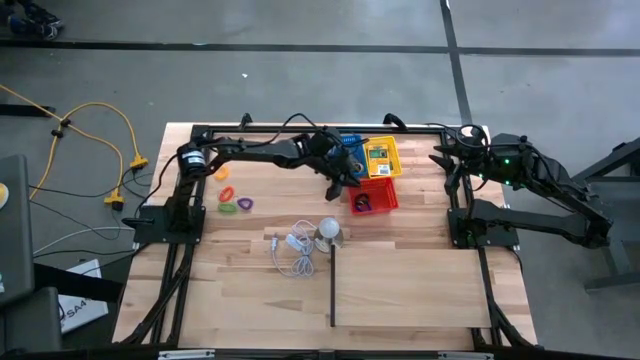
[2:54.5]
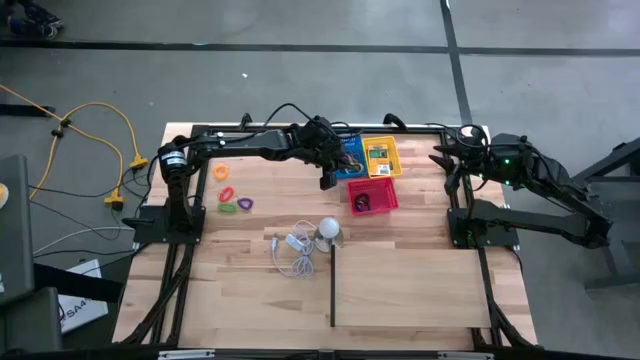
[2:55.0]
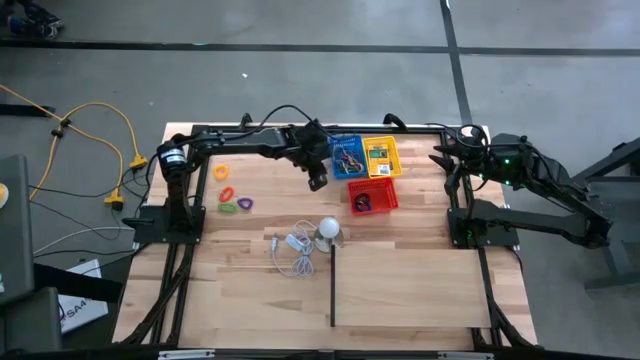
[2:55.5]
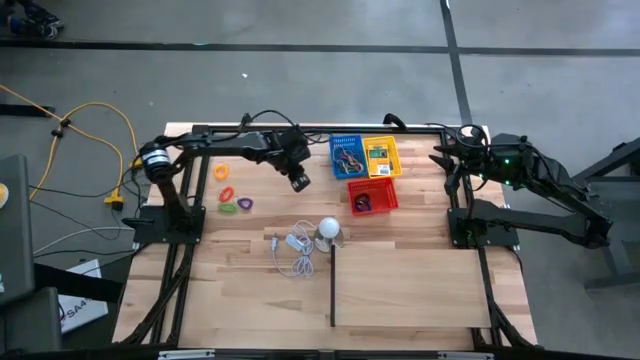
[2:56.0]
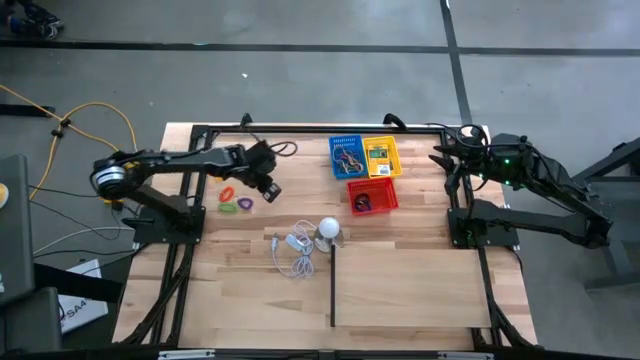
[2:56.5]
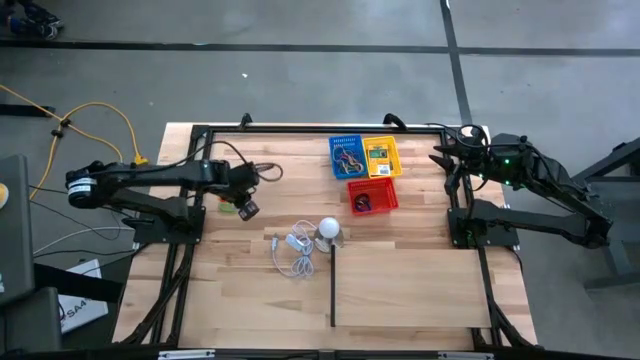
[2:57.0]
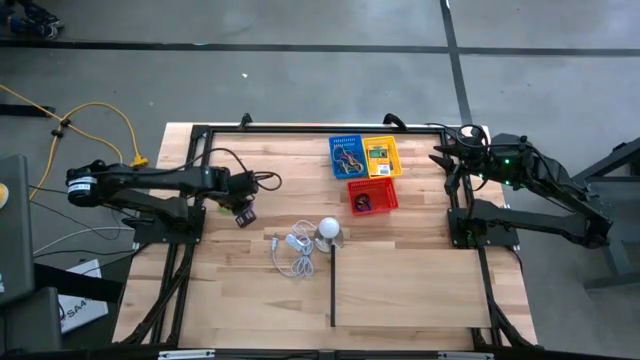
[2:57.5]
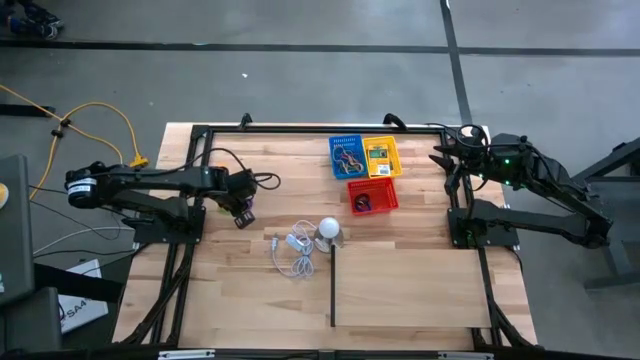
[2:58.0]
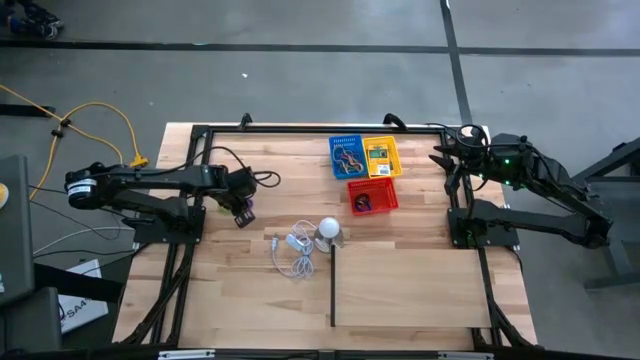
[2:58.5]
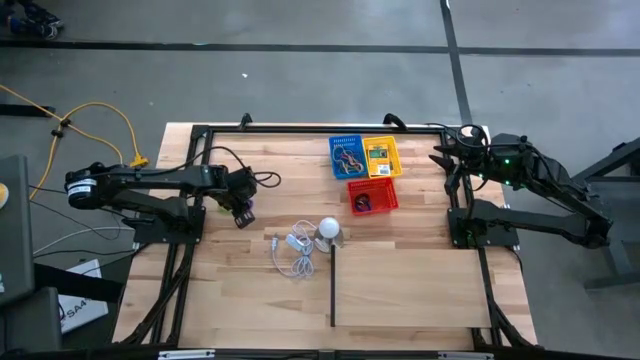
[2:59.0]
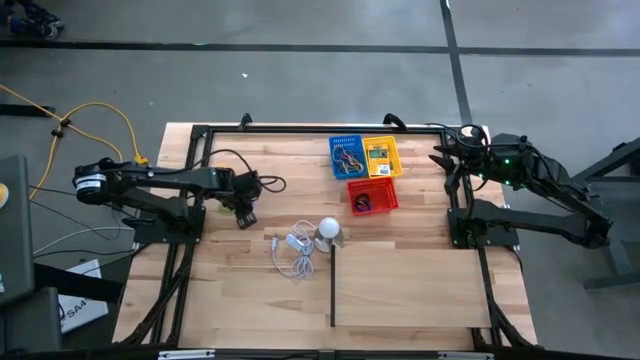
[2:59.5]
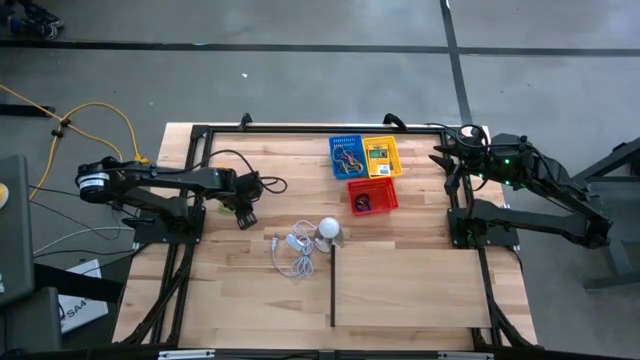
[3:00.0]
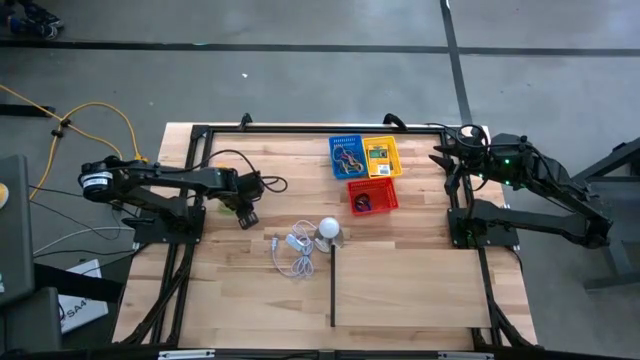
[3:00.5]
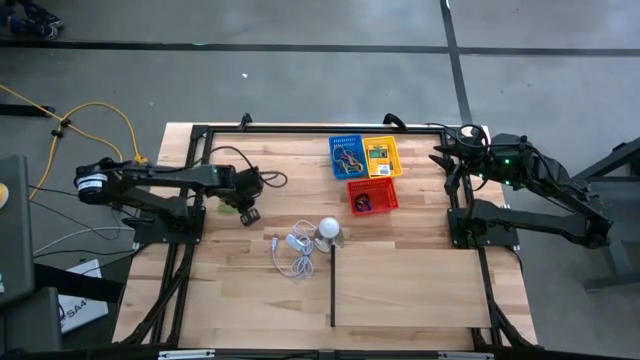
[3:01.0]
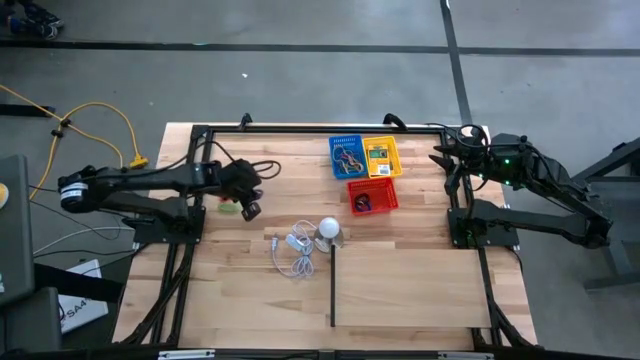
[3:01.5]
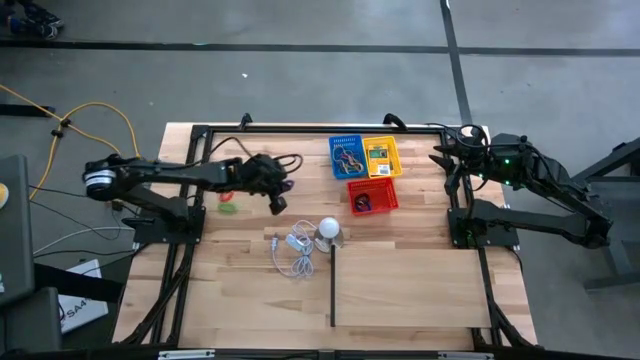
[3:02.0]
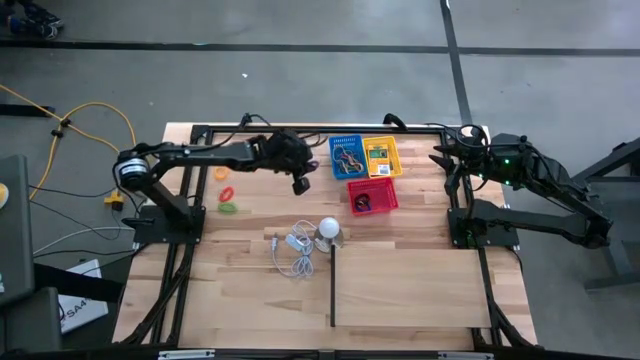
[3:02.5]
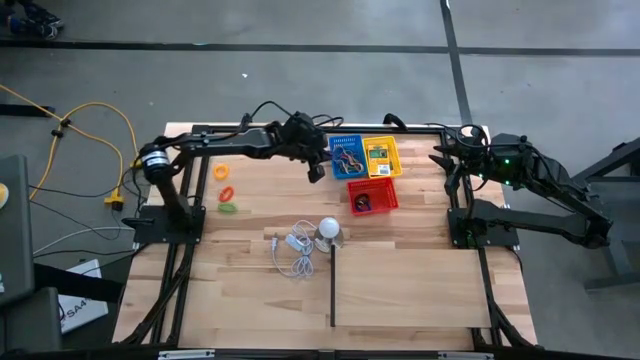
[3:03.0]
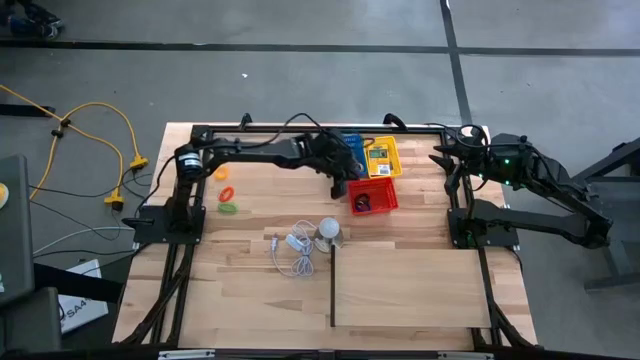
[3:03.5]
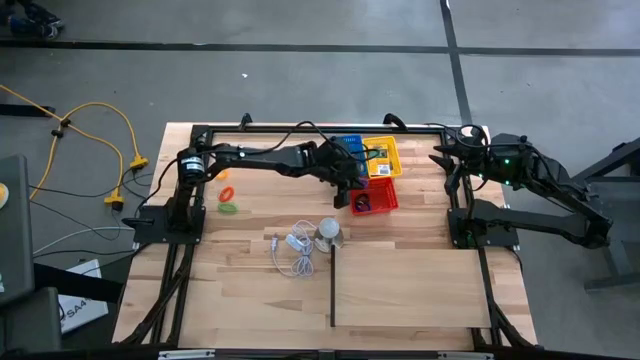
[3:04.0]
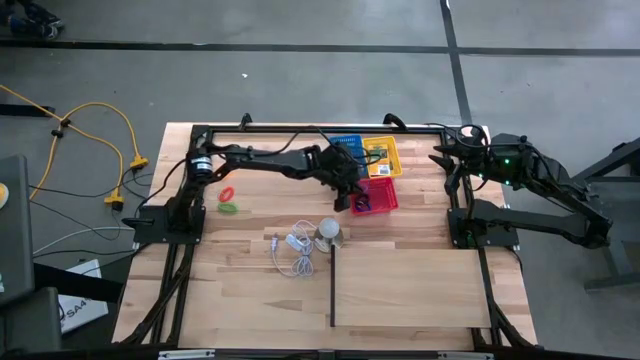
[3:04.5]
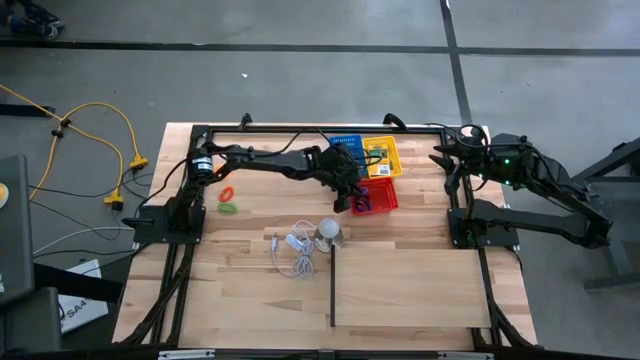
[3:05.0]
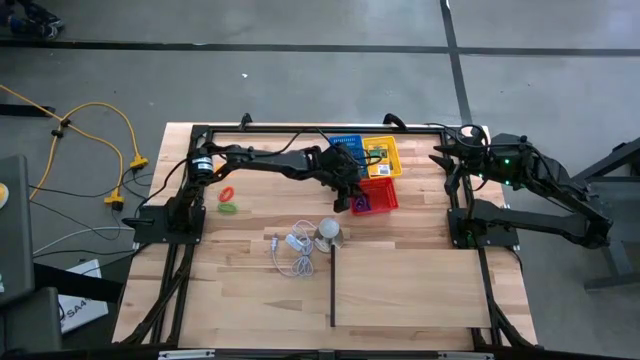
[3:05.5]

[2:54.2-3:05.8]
Task: Pick & Place Office Desk Supplies
Put the purple coil keychain into the red bin

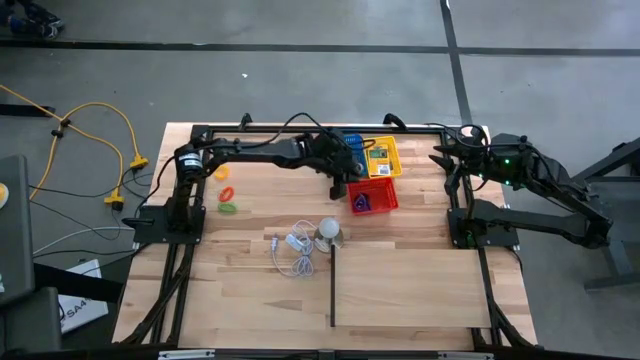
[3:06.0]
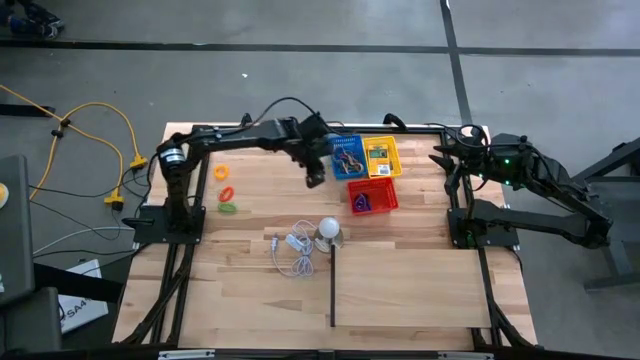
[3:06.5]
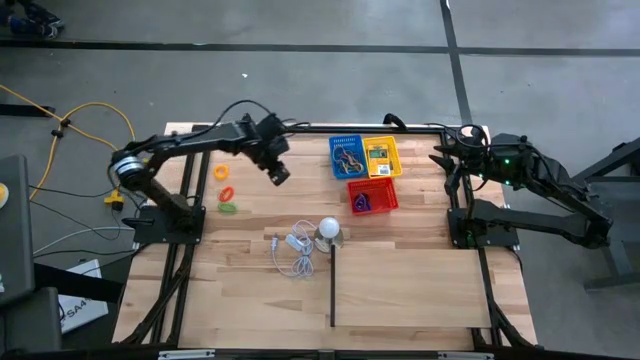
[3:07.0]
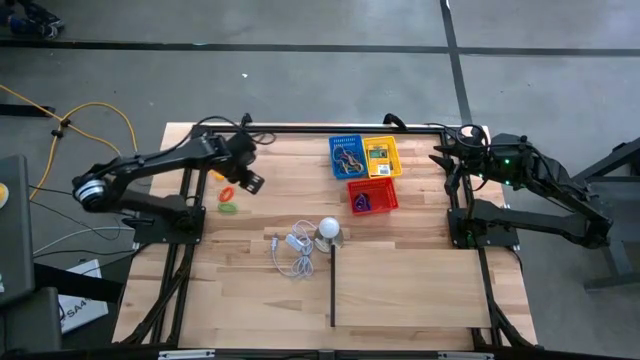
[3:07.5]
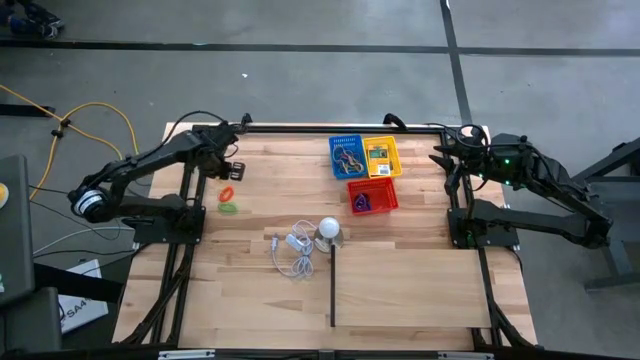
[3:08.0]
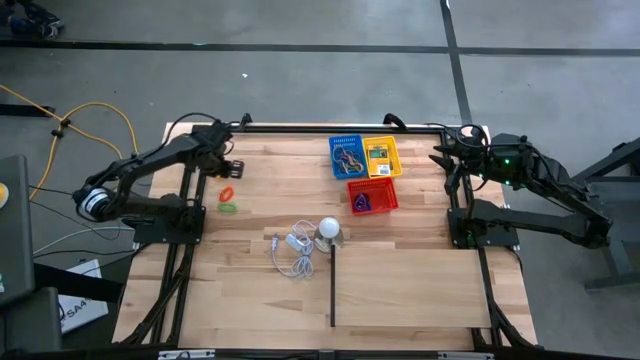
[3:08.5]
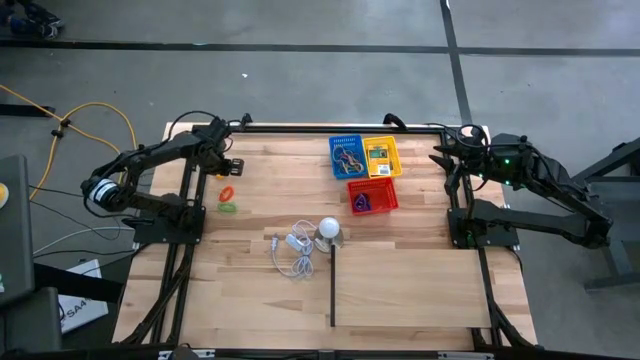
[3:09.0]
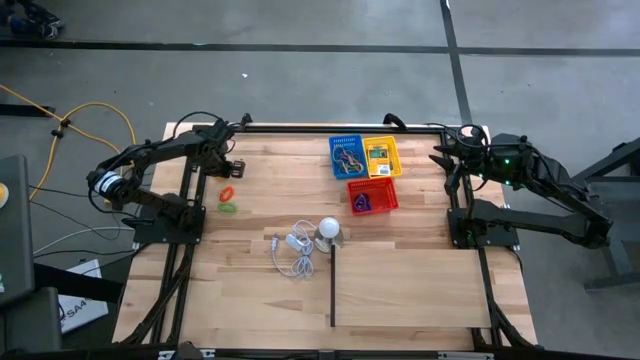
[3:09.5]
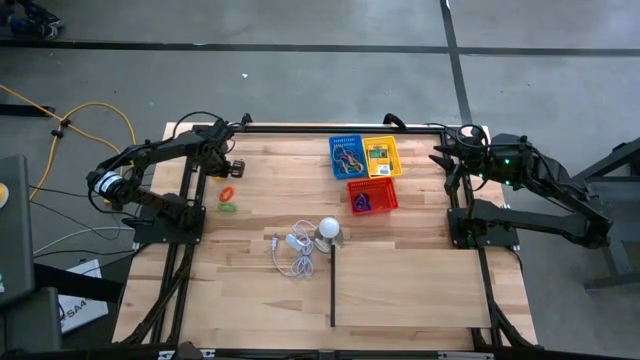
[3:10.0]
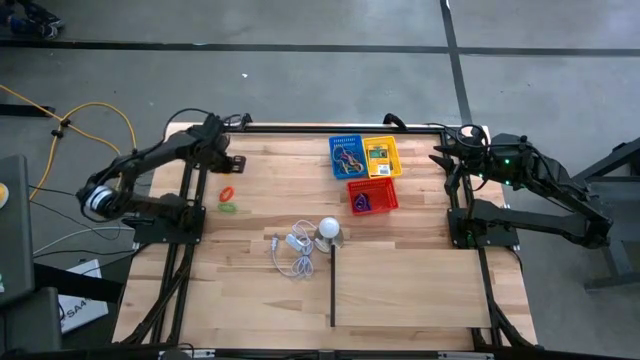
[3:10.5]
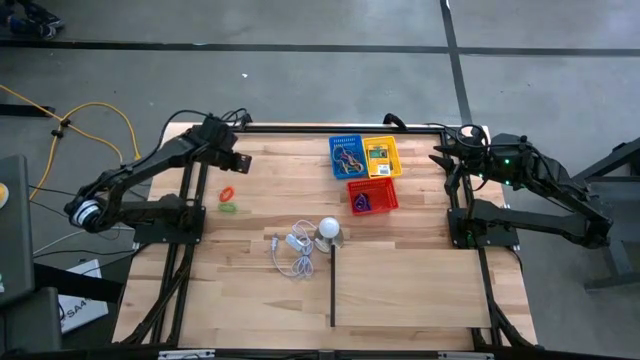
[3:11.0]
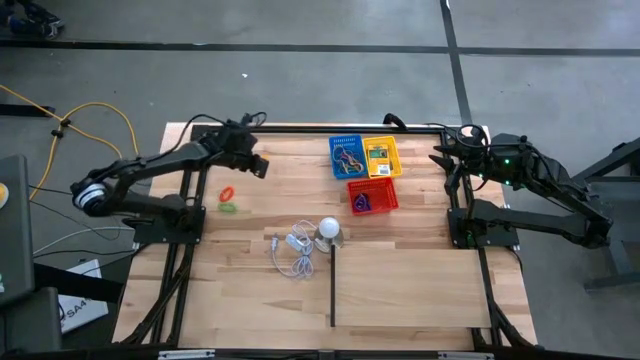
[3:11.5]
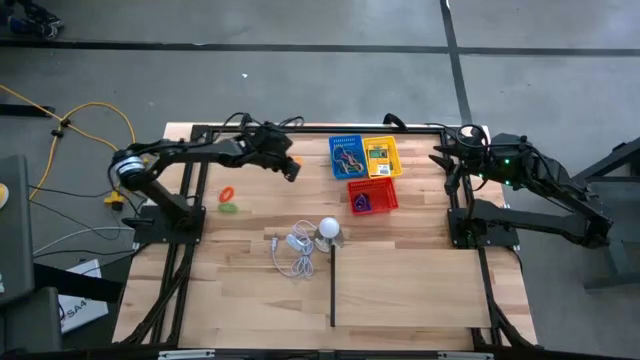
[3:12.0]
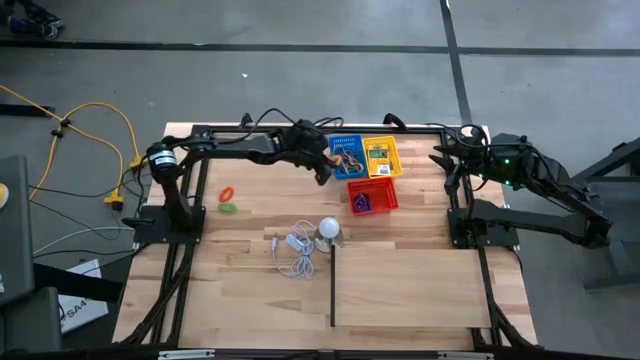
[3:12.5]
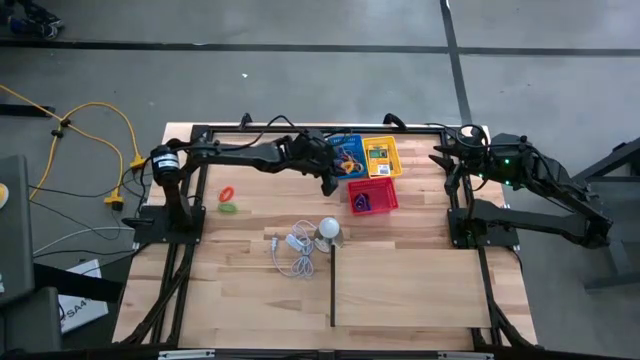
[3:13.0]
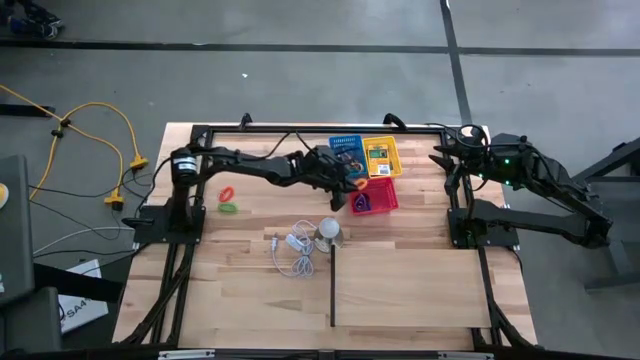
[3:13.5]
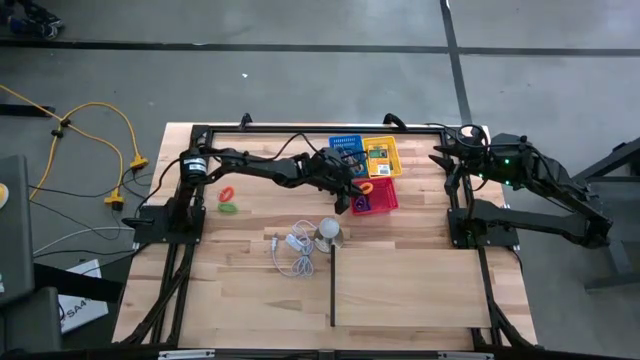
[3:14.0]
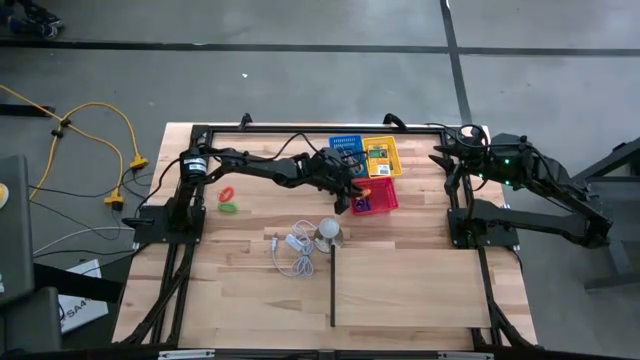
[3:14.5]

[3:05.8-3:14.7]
Put the yellow coil keychain into the red bin

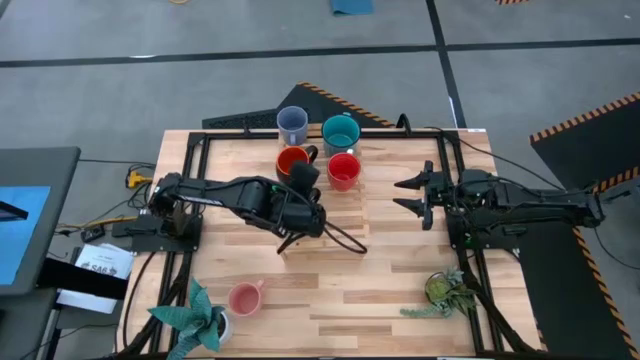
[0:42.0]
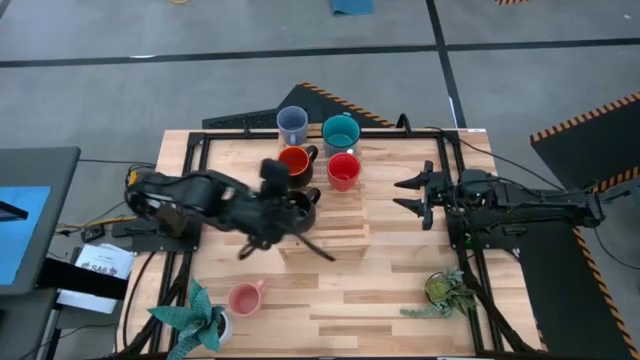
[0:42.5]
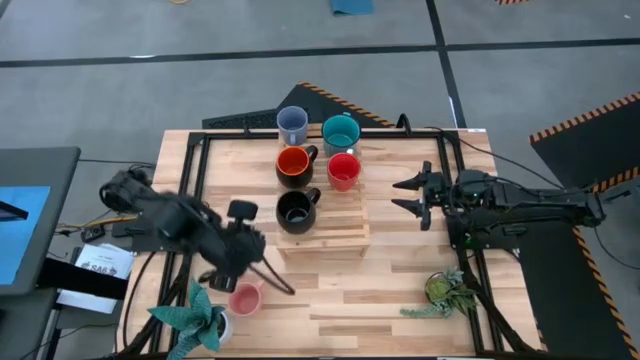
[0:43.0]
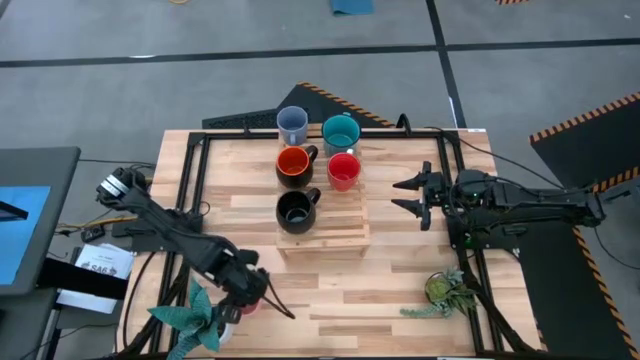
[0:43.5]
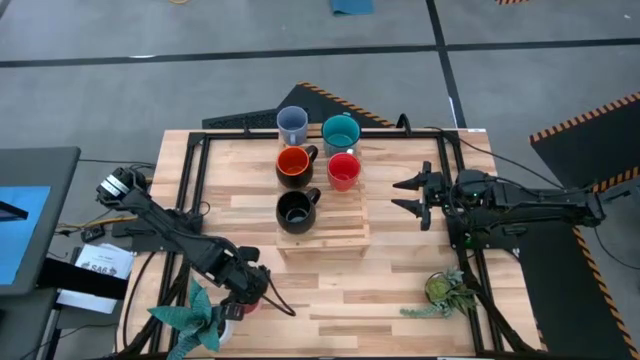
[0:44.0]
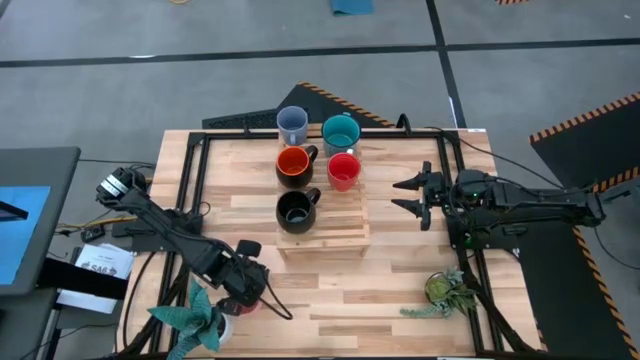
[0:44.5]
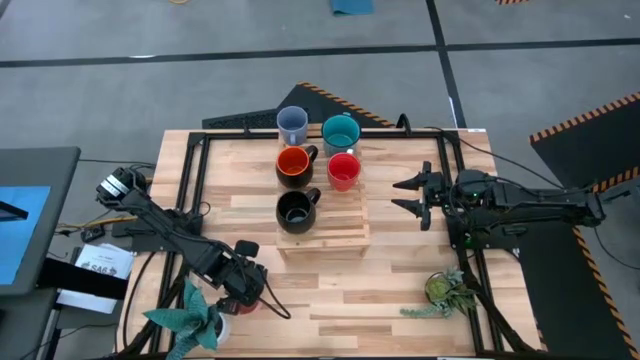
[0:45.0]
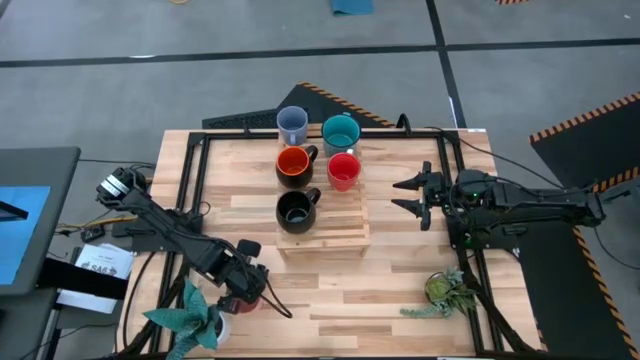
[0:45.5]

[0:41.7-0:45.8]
Task: Place coffee mugs
Put the pink mug on the shelf aligned with the red mug
